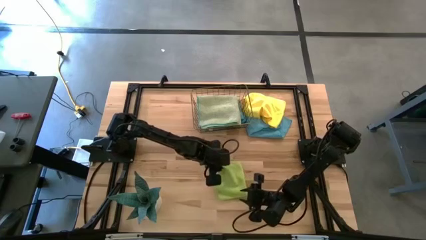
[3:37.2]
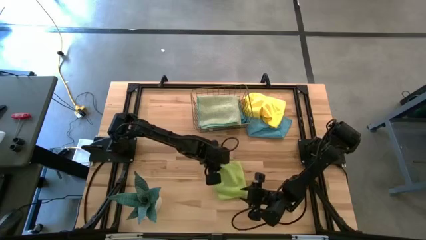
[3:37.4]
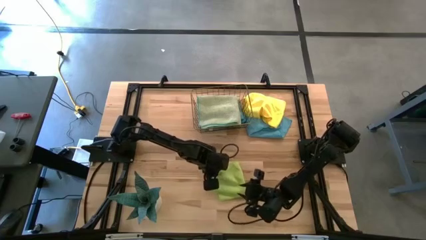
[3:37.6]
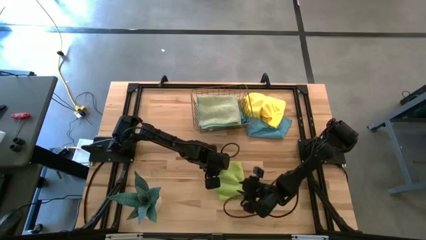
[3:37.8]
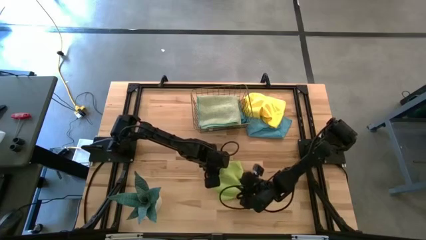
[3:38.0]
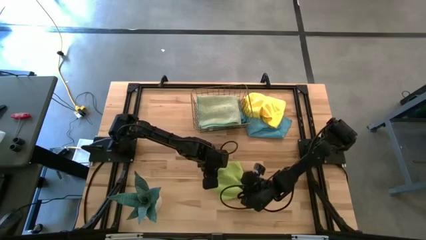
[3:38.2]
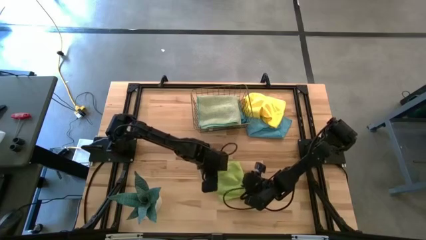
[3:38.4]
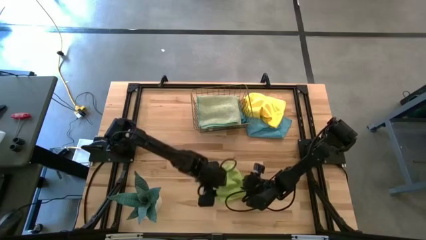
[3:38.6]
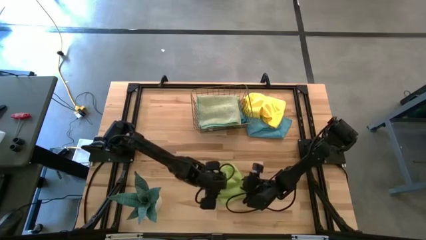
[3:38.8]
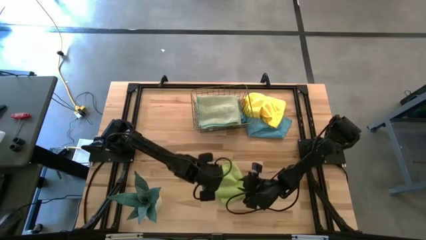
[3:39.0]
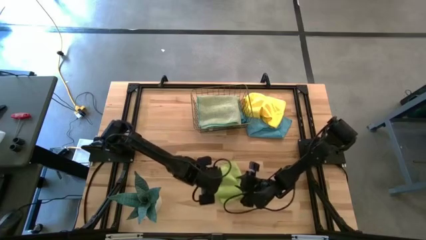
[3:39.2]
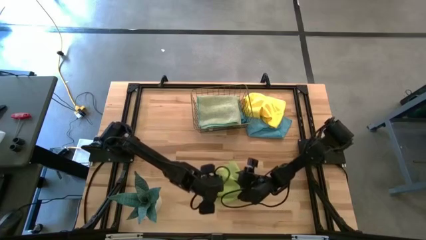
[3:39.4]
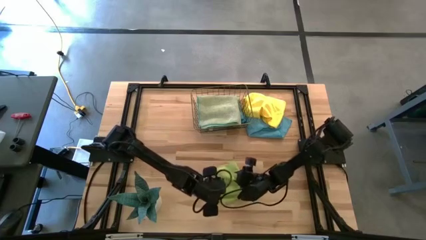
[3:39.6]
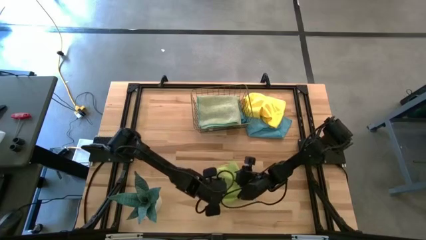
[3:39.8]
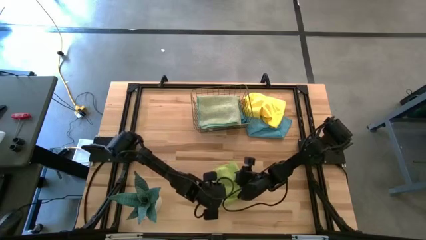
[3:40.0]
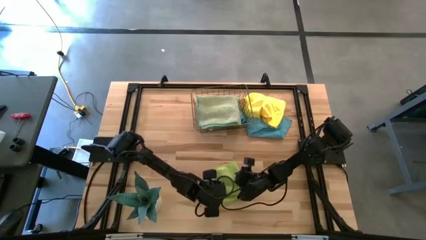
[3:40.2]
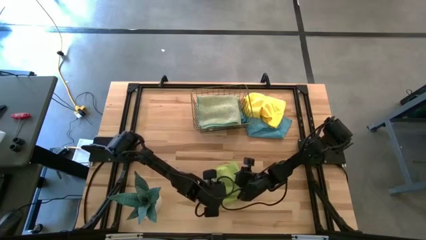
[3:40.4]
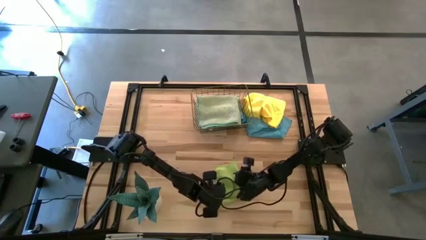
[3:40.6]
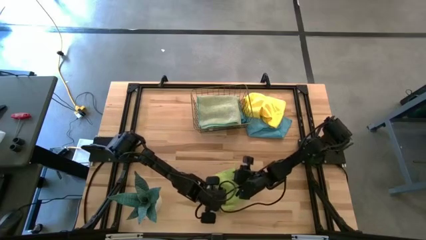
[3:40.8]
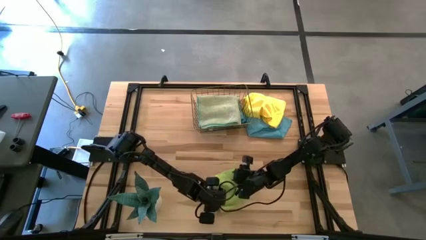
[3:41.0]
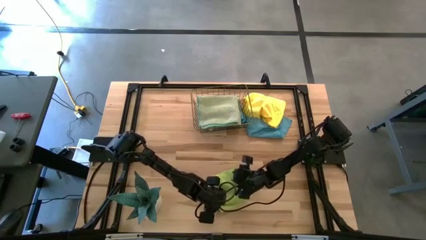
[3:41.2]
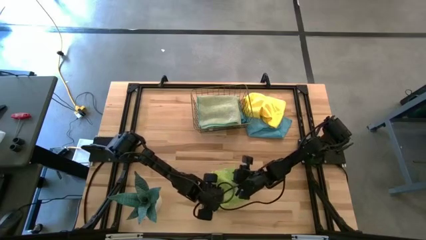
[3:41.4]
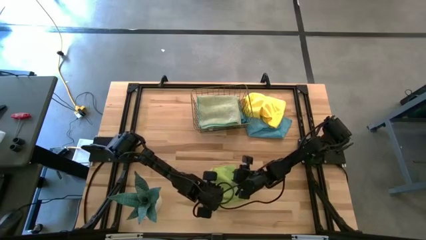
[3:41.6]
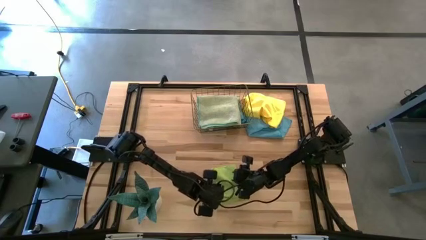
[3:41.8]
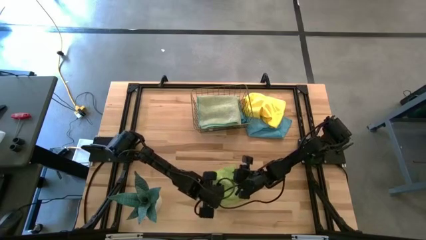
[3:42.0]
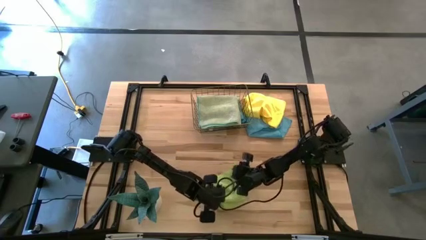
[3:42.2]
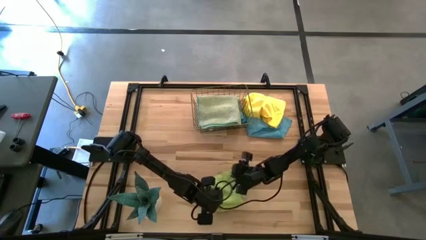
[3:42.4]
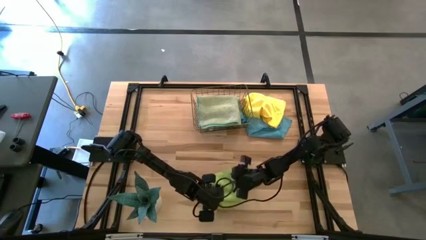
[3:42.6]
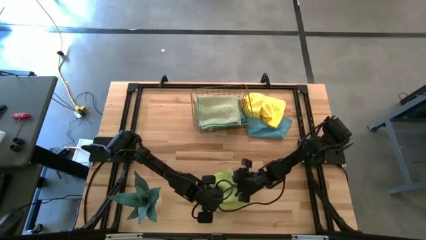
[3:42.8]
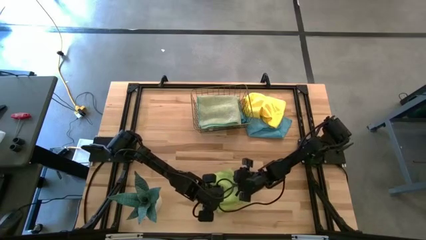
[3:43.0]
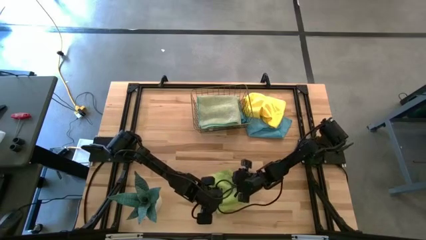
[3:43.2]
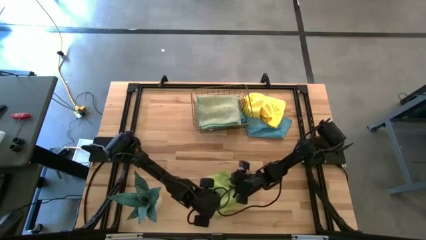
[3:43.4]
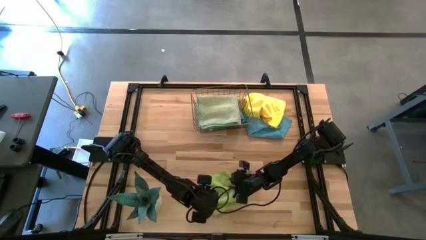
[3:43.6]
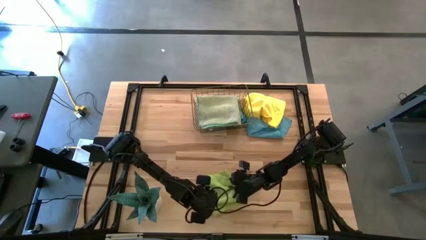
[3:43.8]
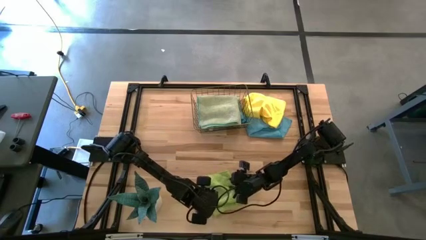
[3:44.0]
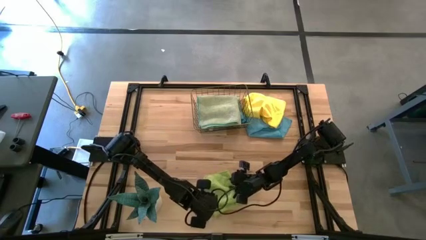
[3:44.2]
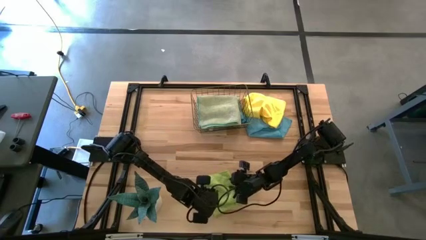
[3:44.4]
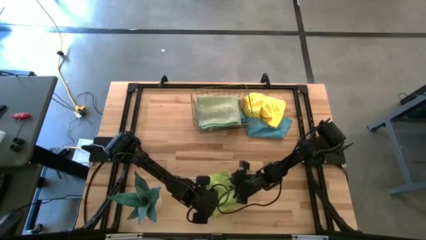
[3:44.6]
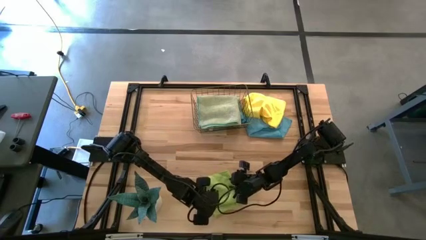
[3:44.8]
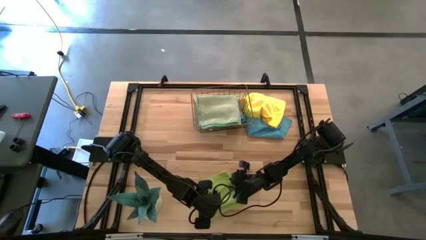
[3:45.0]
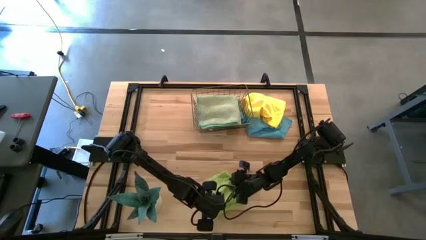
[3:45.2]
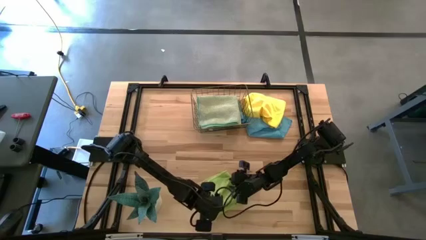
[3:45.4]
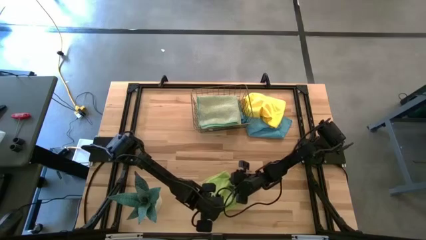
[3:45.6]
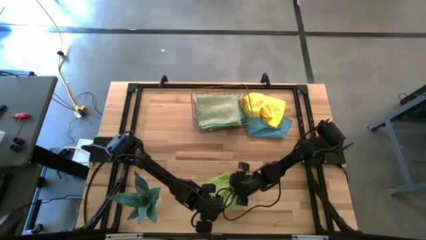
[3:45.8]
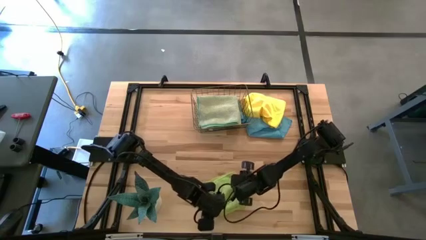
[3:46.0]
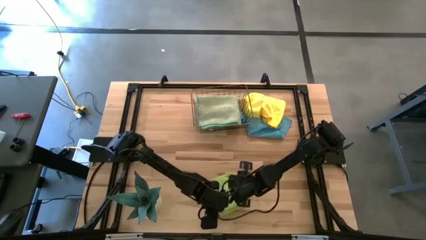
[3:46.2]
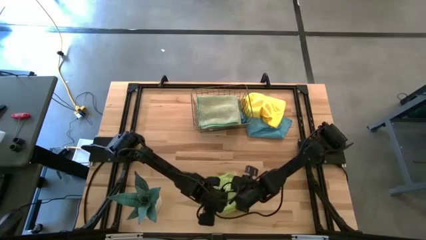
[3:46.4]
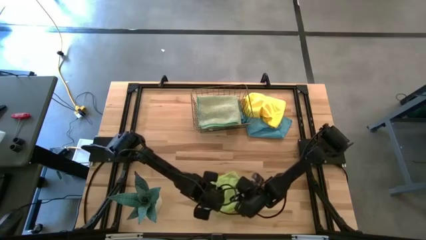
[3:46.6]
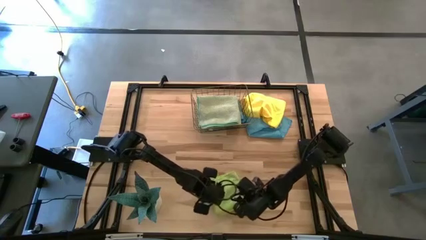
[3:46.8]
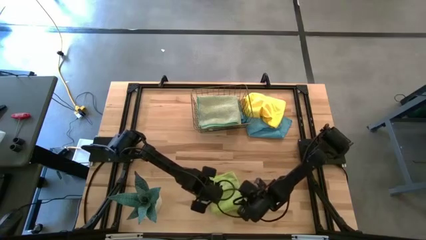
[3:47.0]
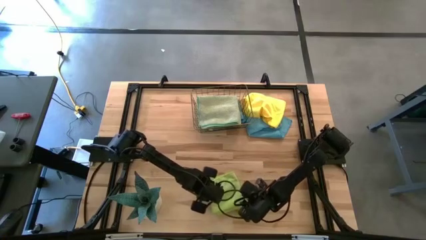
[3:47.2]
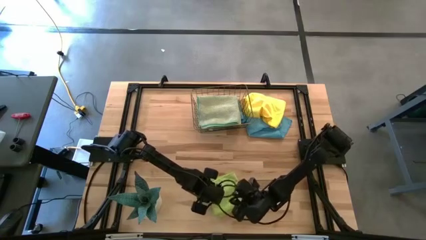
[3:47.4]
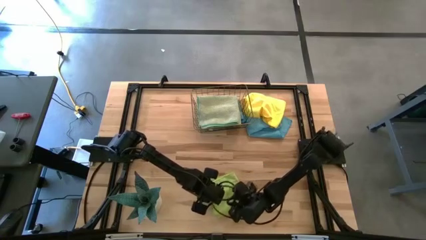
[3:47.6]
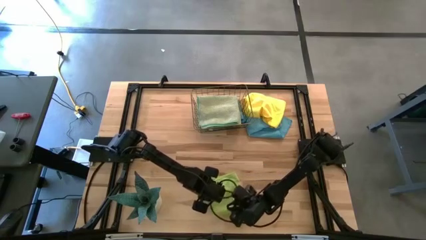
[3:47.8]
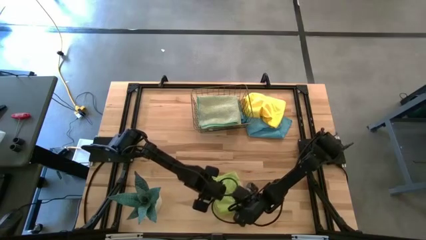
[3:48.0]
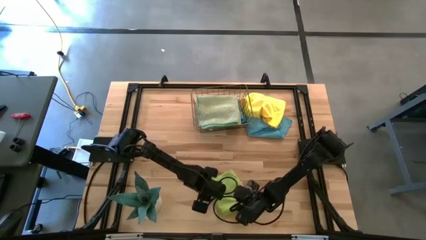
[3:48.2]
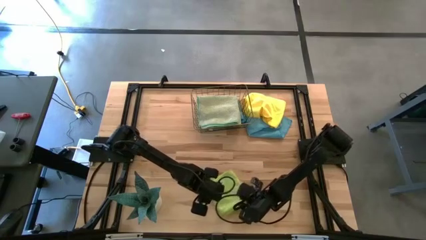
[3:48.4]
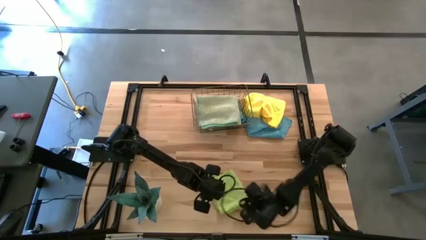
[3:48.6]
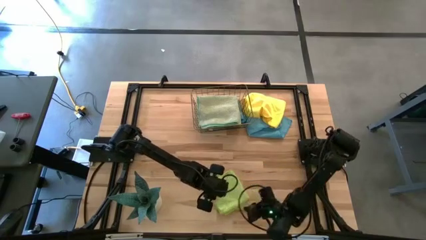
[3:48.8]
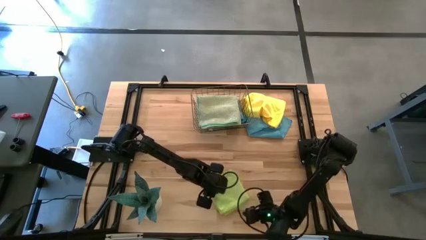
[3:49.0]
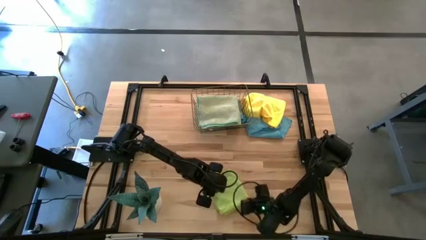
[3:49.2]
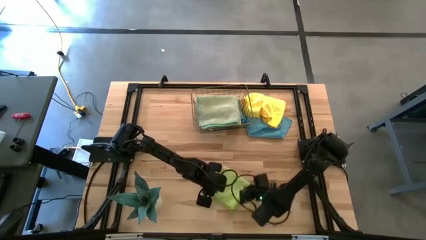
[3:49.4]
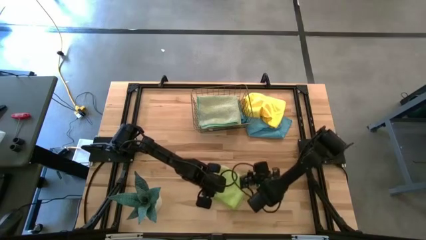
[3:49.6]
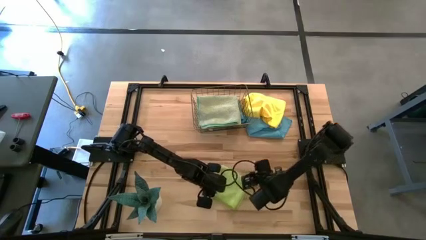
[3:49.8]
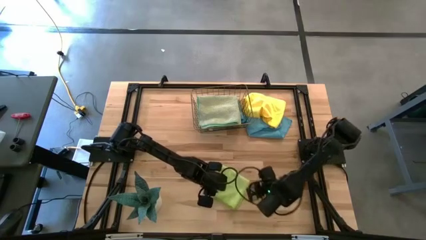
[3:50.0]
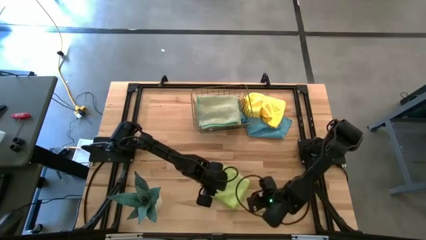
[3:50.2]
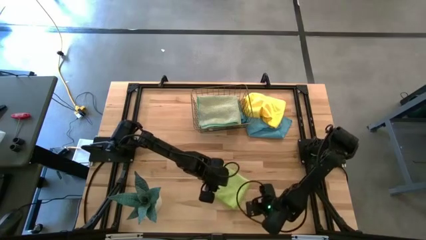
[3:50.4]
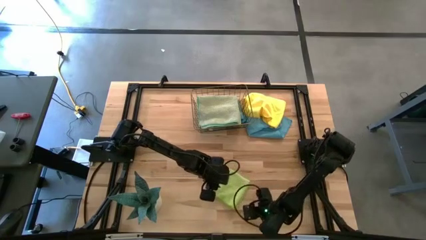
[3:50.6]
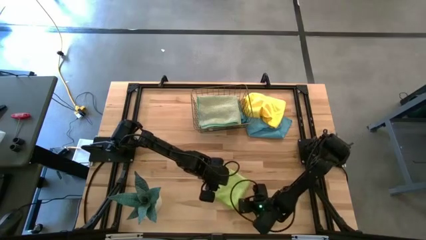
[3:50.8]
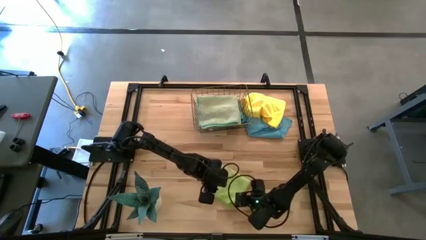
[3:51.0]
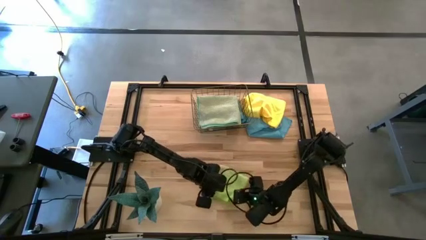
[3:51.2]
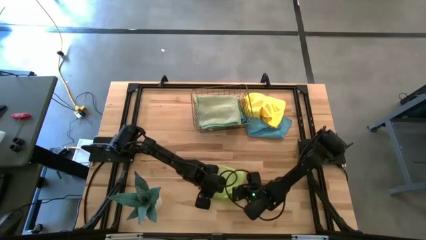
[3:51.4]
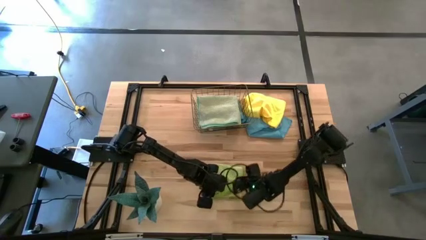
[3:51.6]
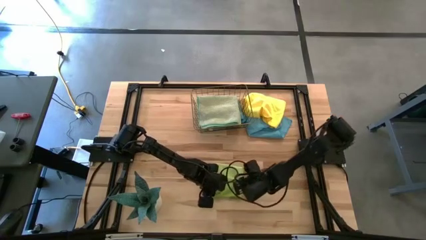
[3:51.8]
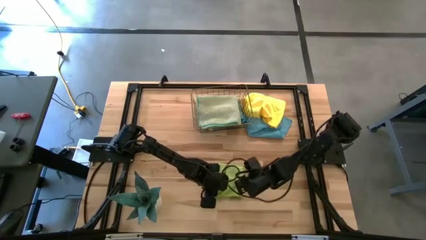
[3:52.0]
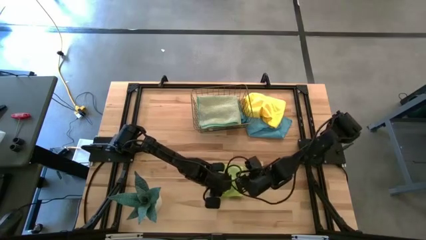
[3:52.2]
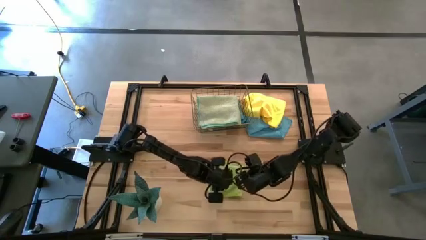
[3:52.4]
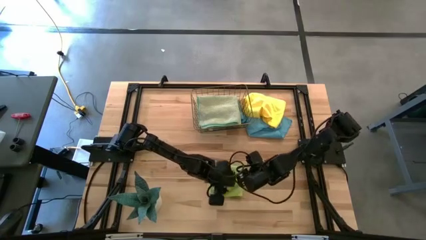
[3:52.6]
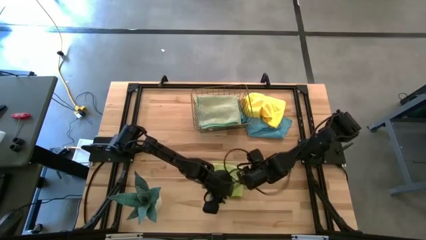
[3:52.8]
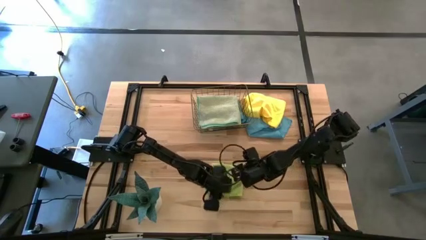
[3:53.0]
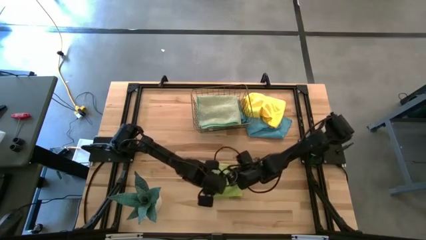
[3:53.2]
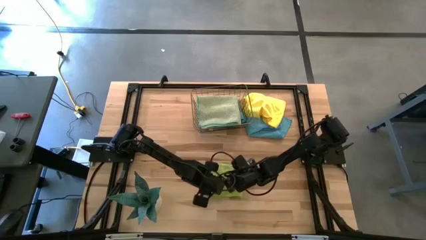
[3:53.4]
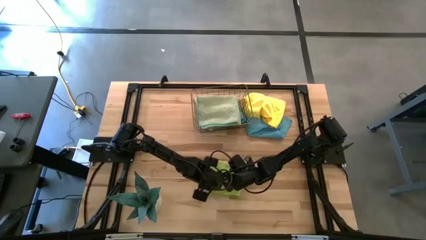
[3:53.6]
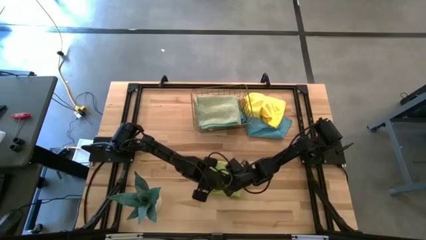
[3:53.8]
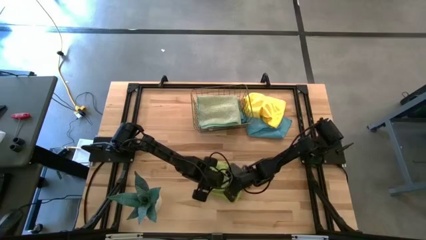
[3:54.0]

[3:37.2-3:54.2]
Task: Fold microfiber towels
Fold the green towel
